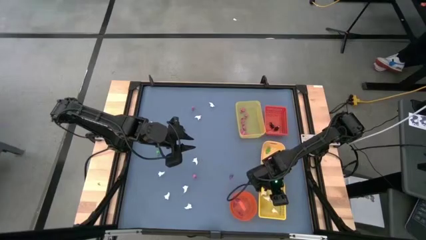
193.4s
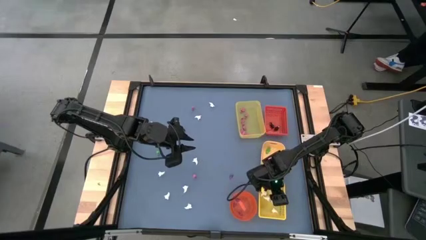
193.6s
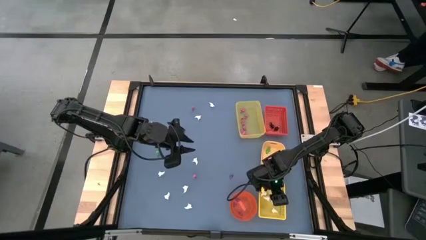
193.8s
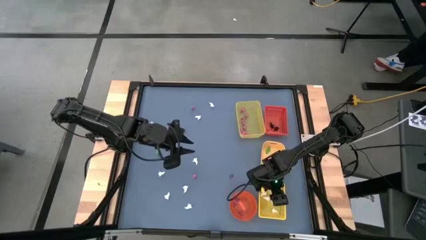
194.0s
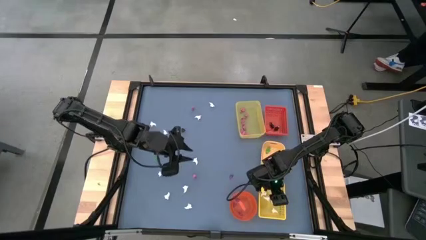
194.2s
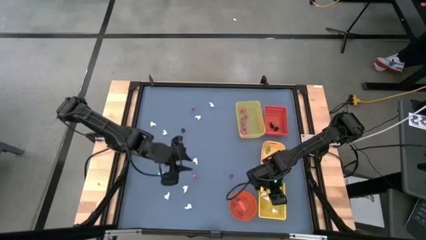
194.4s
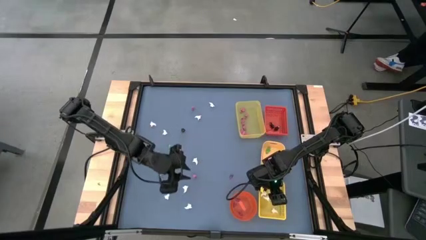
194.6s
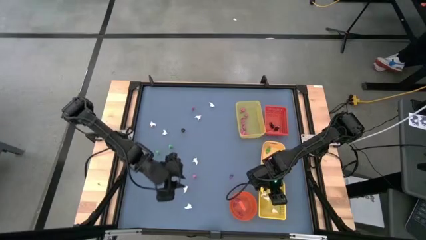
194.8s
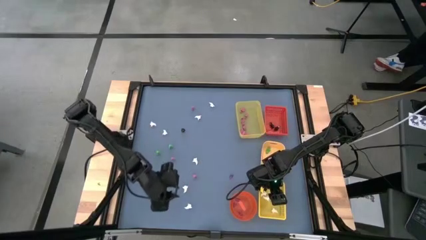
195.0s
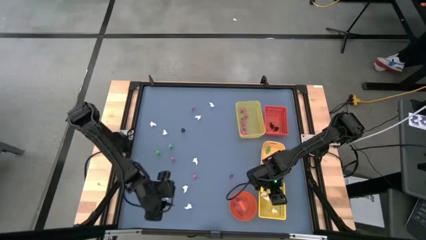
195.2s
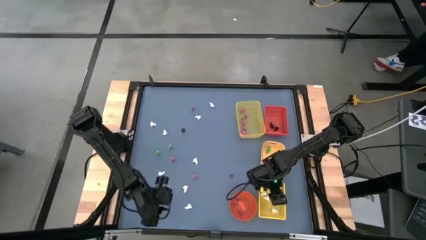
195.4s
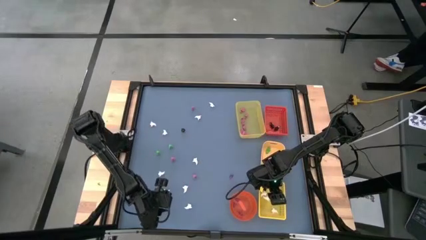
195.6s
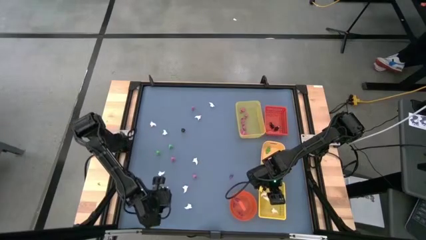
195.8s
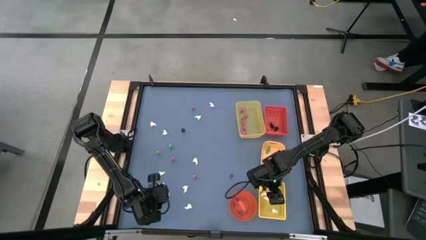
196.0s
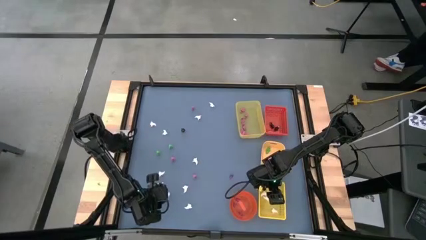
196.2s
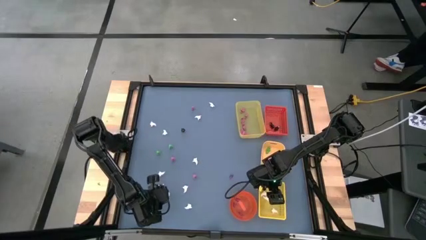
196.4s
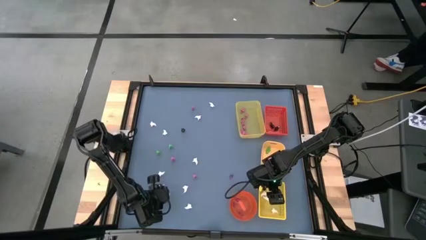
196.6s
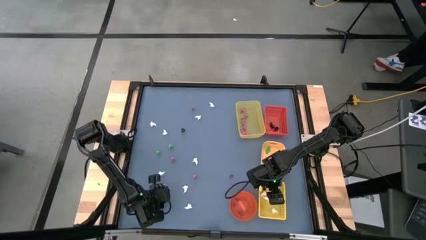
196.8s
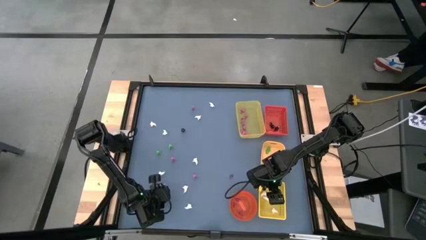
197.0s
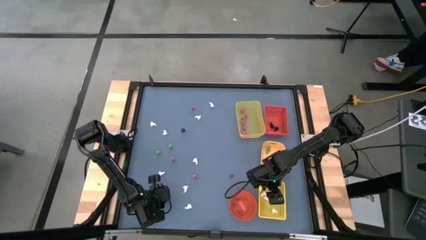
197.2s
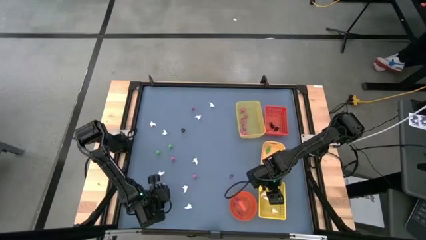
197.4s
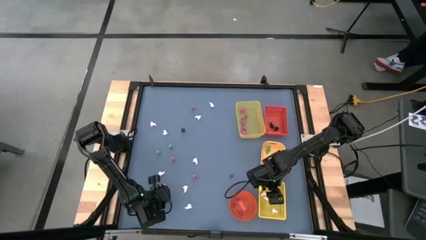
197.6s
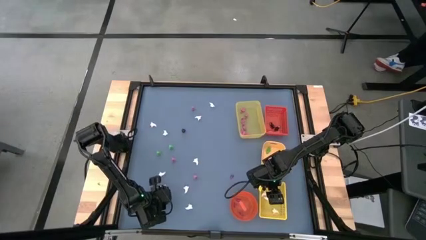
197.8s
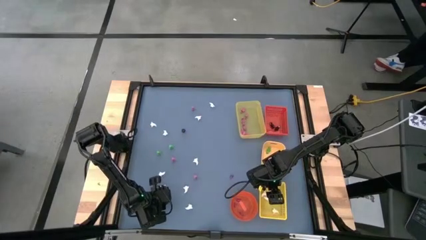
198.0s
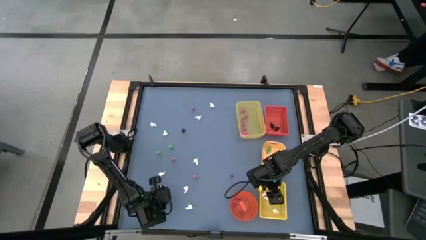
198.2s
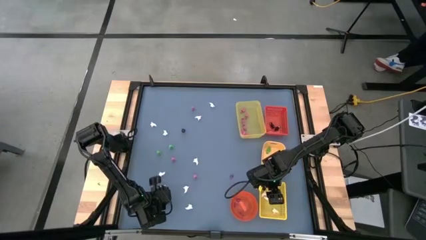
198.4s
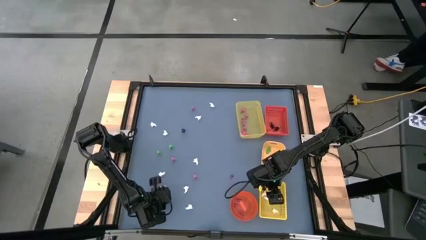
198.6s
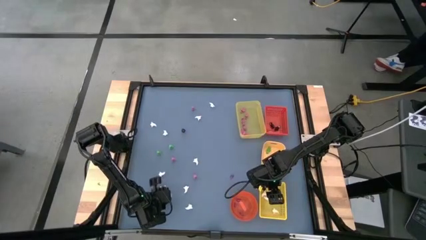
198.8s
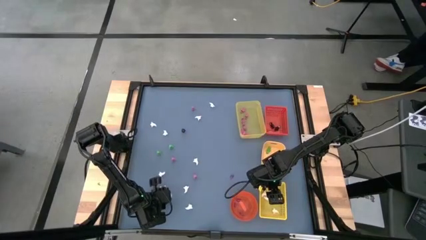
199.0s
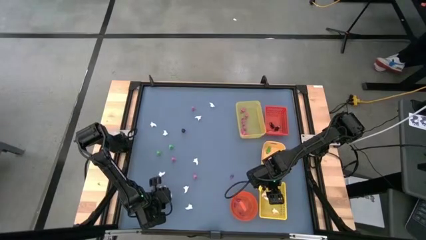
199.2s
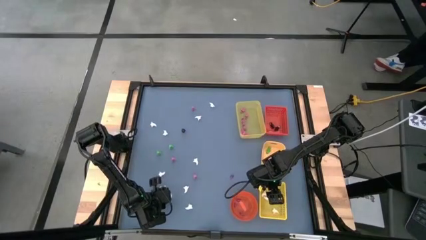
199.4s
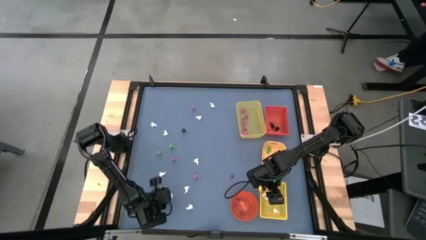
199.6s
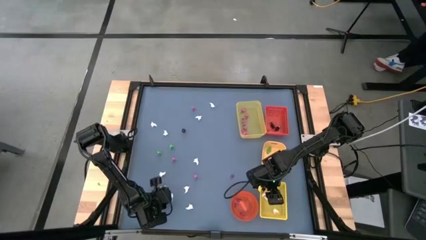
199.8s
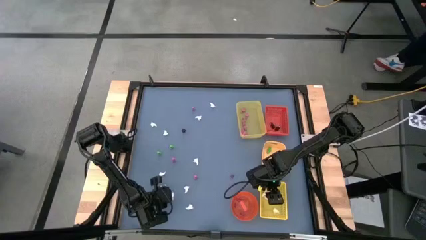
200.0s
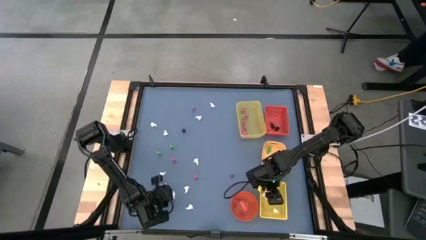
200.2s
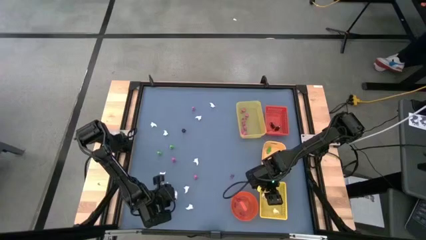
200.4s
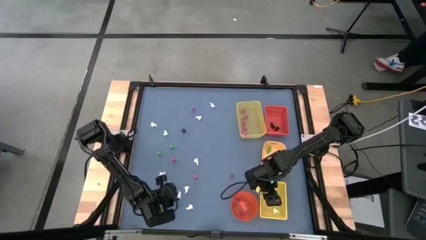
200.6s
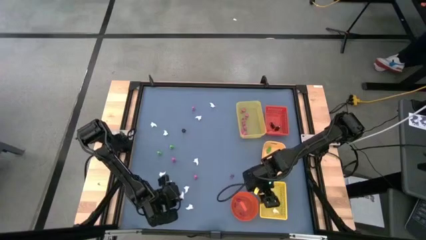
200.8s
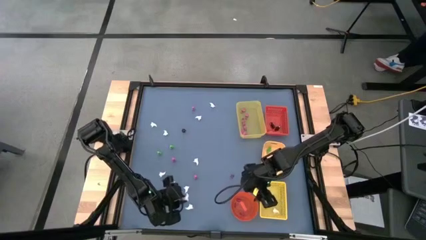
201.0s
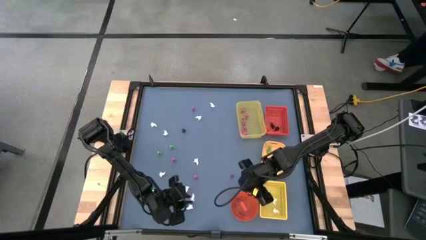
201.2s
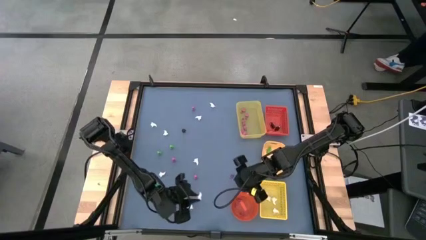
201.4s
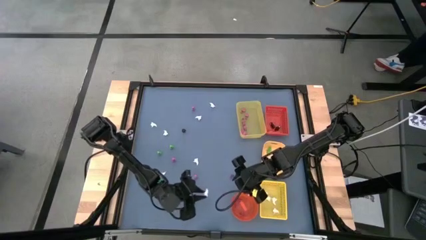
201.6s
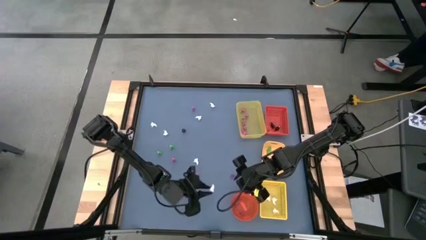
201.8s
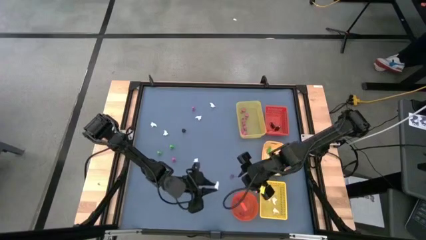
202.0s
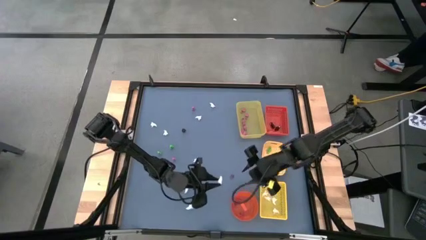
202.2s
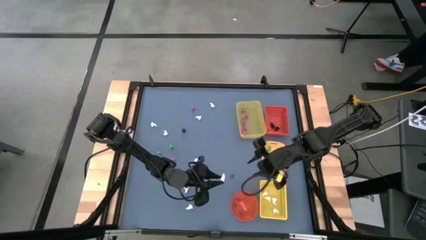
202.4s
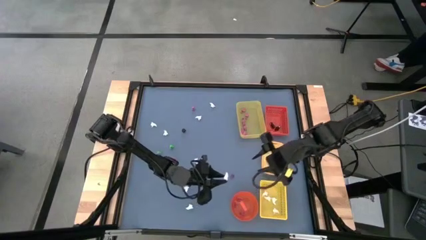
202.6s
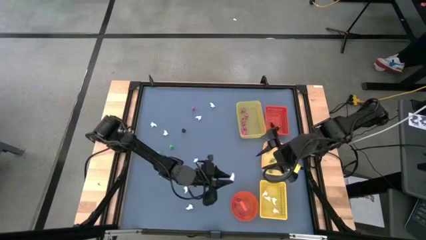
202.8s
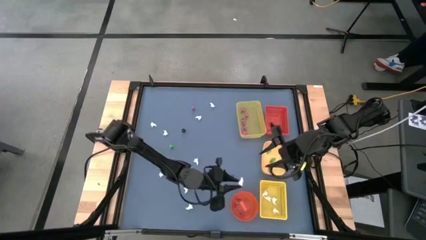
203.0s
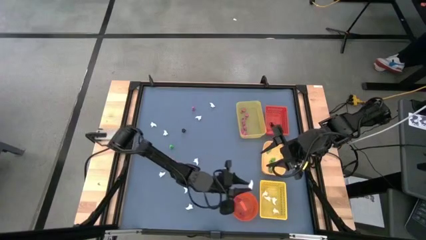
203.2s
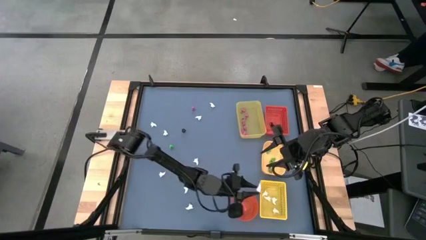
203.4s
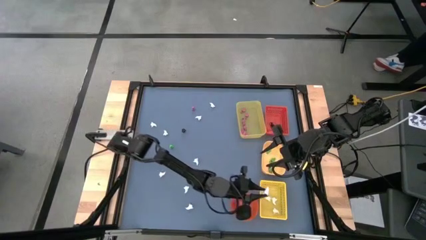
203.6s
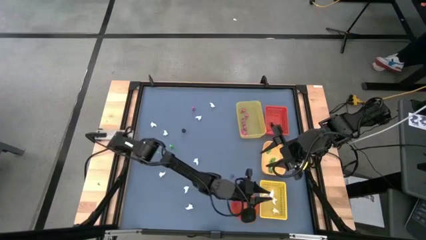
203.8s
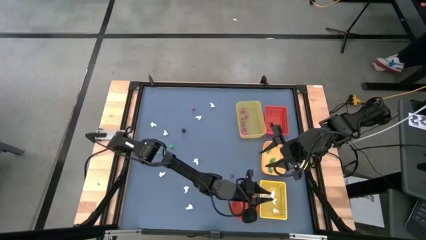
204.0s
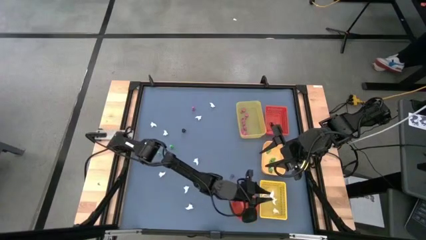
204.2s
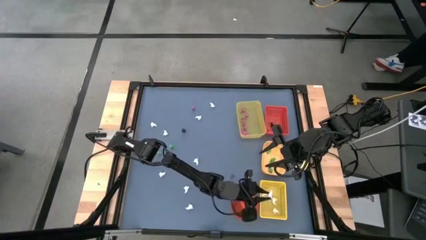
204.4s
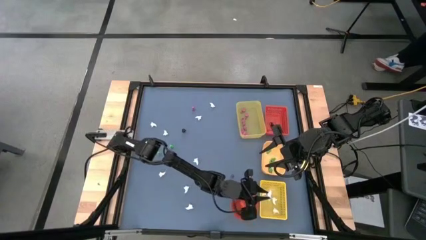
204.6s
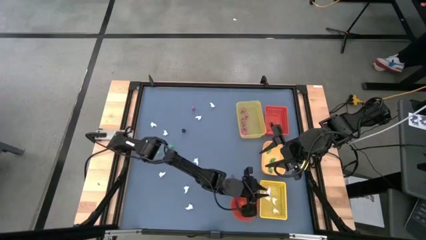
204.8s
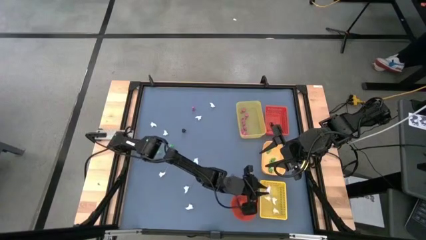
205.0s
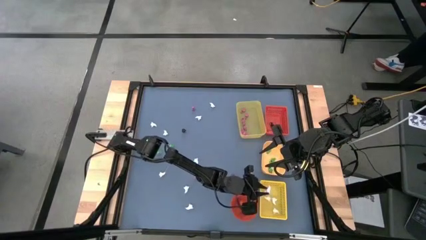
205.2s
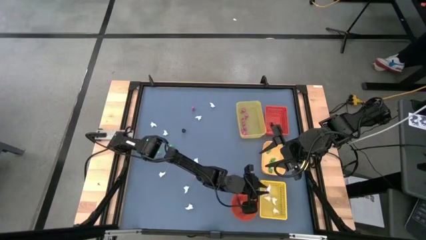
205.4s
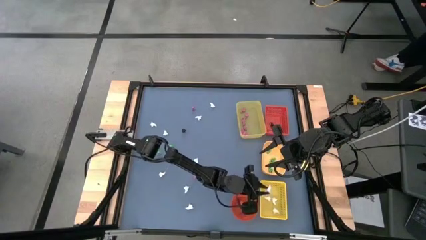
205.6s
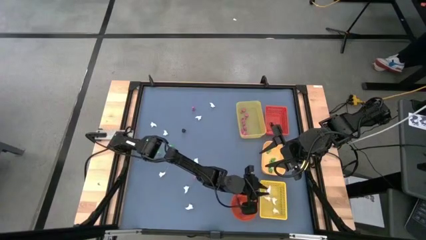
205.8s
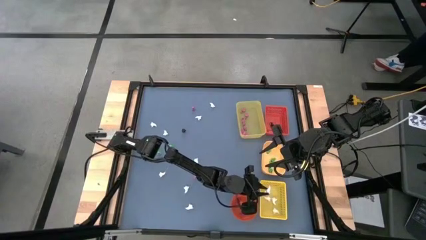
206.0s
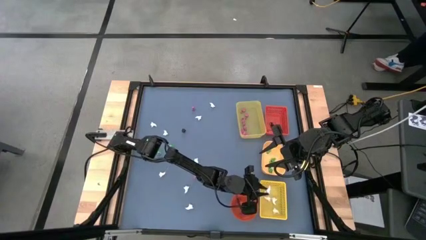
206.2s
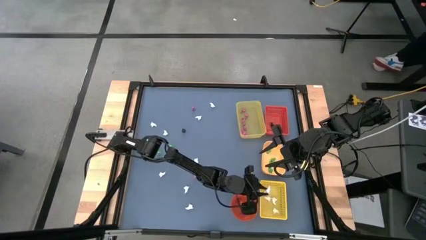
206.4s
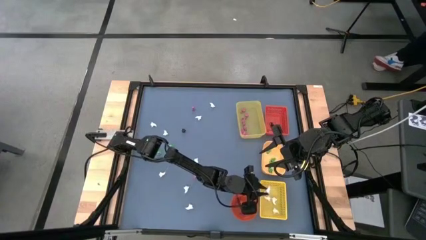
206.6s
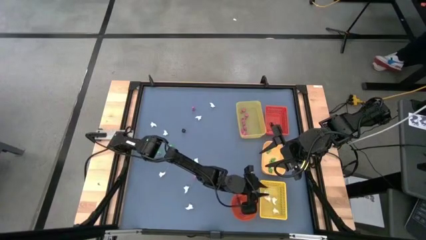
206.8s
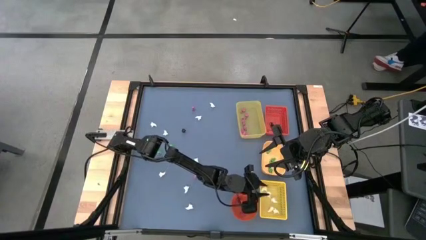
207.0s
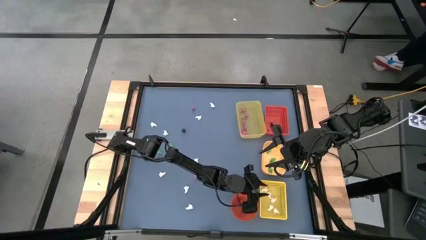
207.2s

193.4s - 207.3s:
Task: Sort Halloween decoration
Put the white ghost toy into the yellow box
